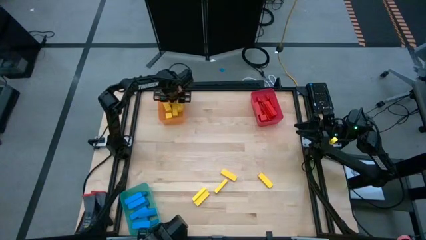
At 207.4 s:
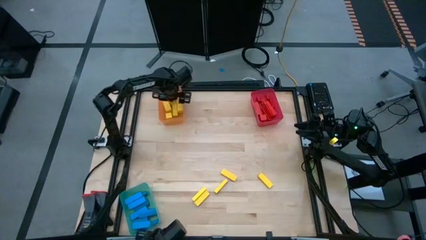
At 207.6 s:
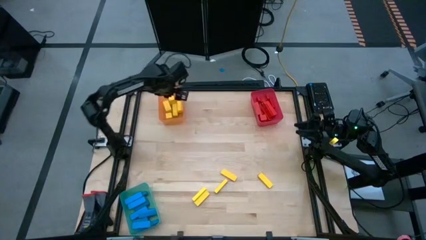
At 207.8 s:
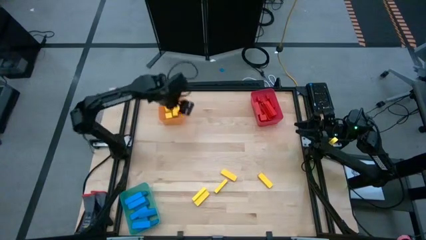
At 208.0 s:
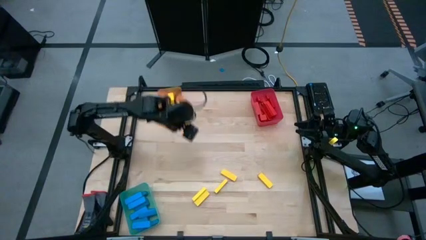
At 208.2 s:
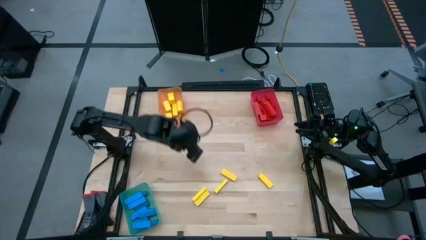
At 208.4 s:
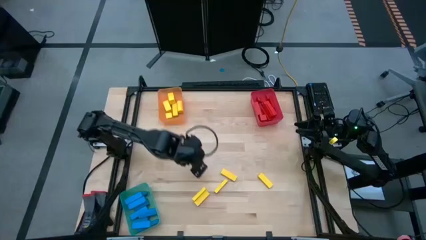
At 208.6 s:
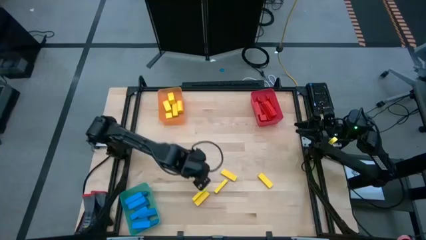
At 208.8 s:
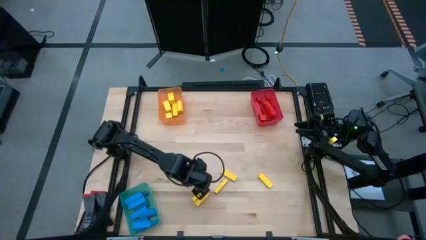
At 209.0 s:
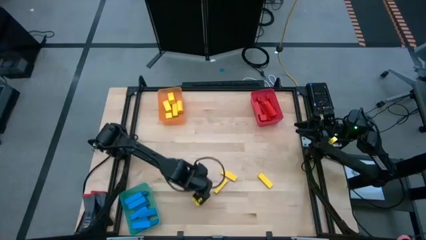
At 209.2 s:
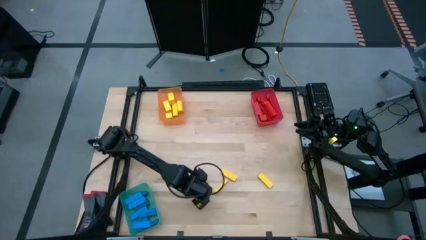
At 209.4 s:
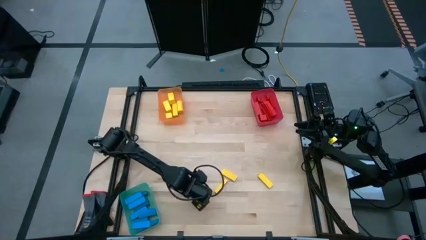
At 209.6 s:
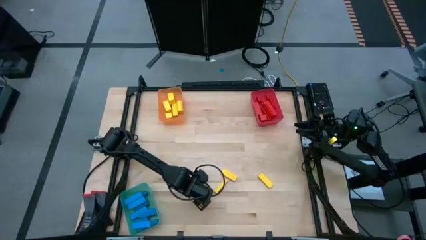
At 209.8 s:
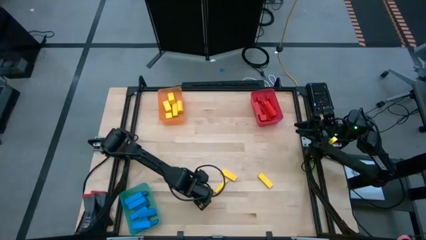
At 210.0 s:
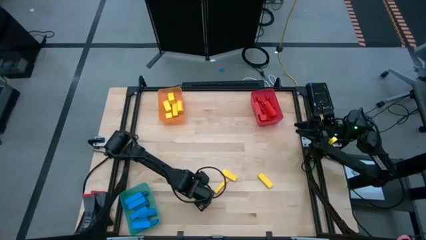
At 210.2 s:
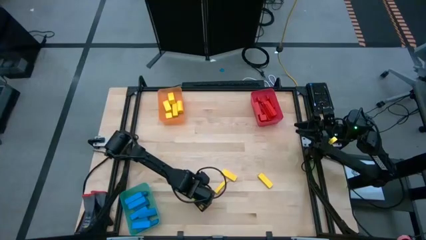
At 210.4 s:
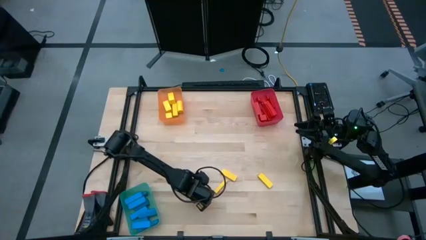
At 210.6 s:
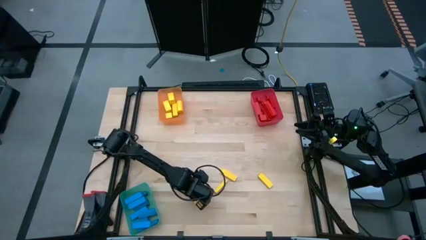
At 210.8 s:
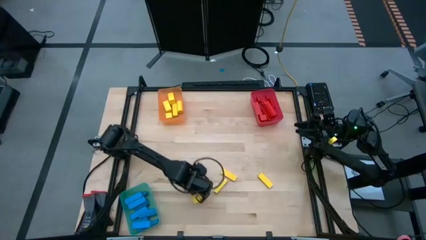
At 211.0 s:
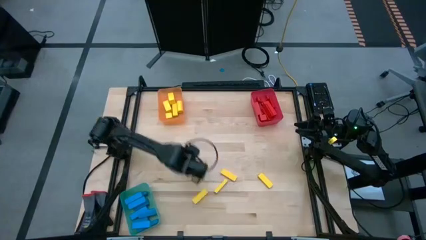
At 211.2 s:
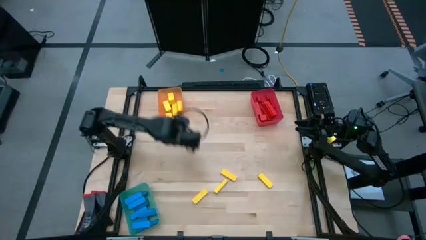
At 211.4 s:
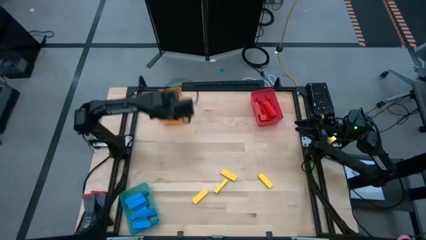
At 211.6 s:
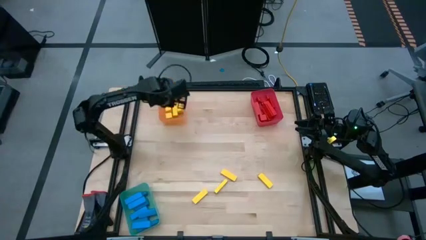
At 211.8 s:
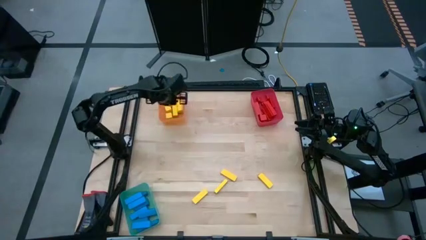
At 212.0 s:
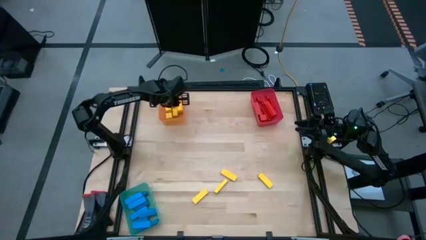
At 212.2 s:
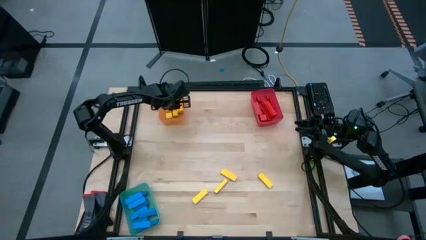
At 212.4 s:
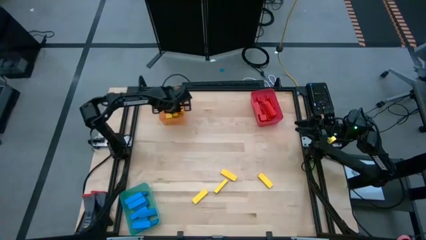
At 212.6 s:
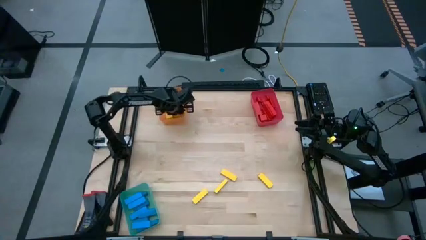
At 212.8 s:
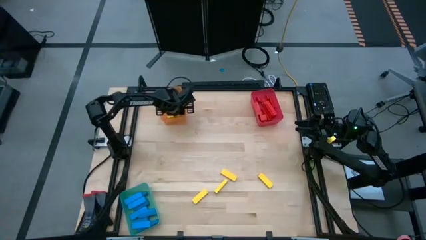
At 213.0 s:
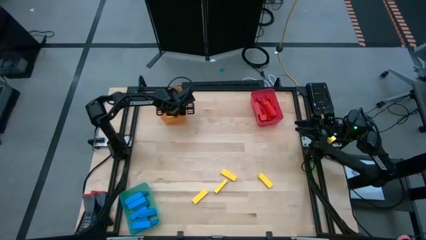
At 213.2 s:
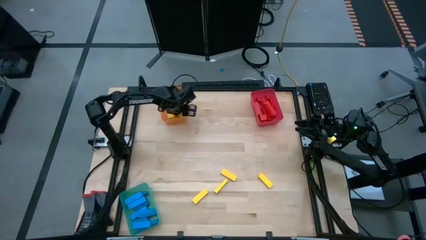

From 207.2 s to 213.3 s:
Task: Sort blocks
Put the yellow block into the orange transparent bin

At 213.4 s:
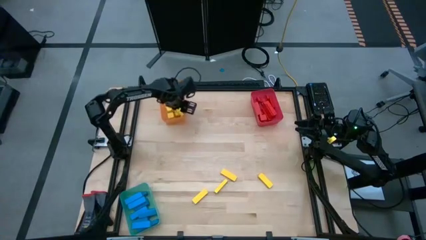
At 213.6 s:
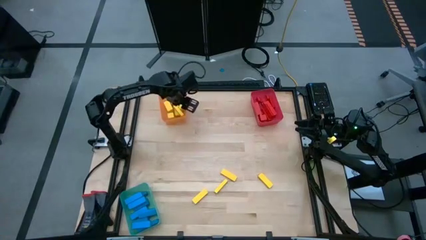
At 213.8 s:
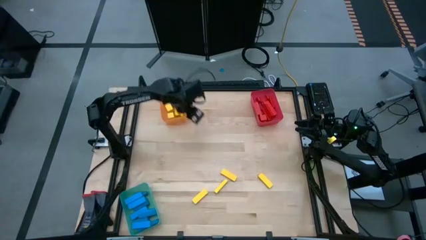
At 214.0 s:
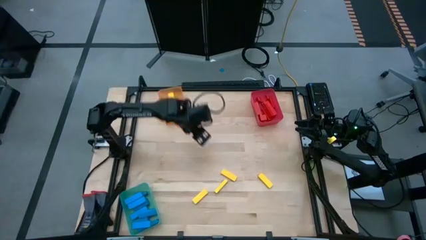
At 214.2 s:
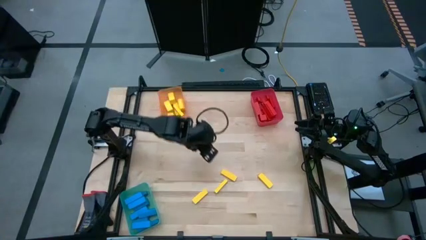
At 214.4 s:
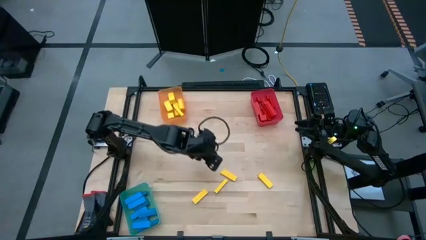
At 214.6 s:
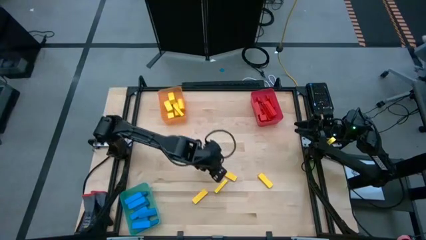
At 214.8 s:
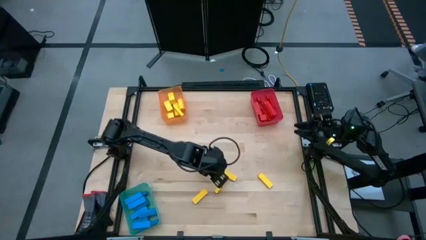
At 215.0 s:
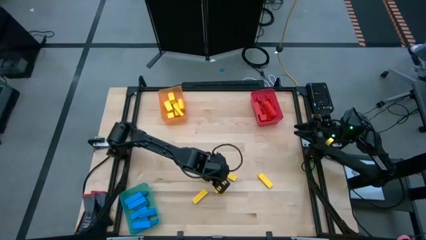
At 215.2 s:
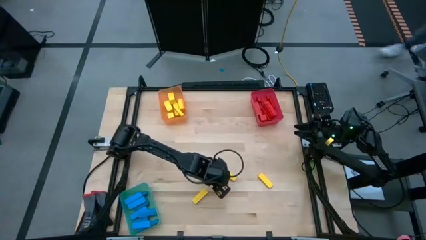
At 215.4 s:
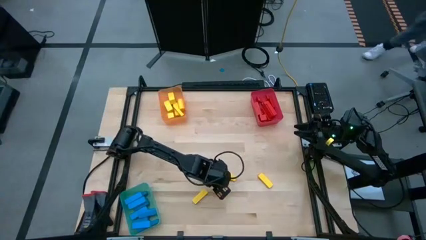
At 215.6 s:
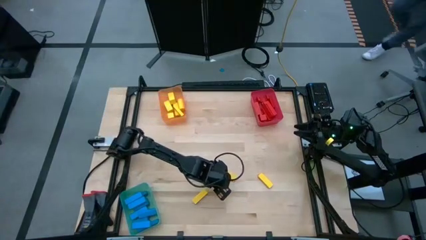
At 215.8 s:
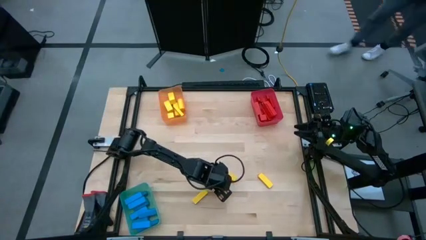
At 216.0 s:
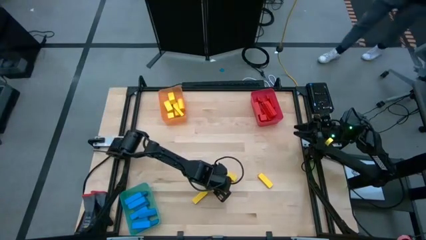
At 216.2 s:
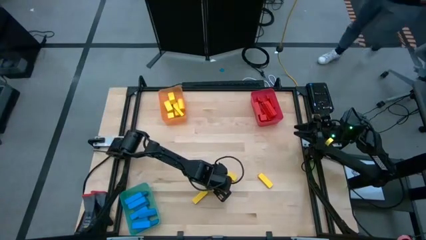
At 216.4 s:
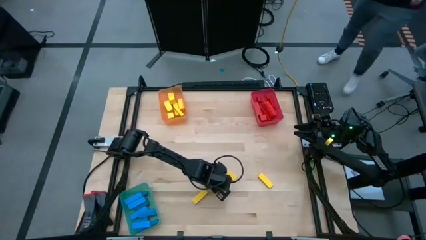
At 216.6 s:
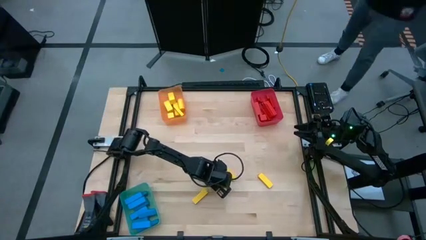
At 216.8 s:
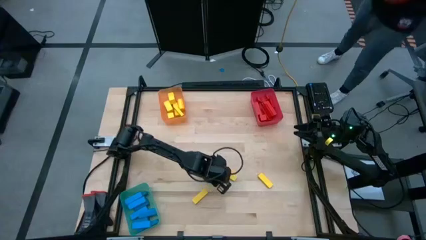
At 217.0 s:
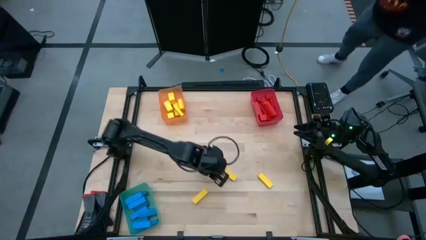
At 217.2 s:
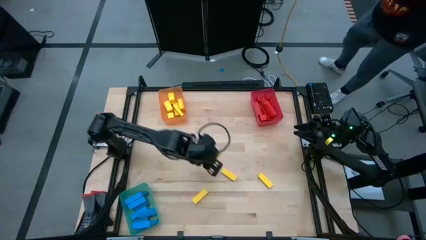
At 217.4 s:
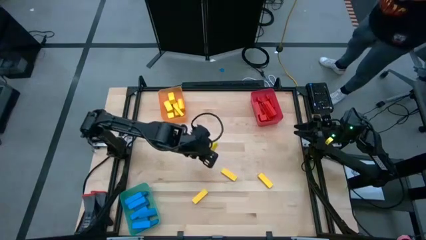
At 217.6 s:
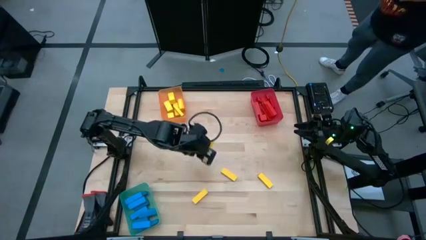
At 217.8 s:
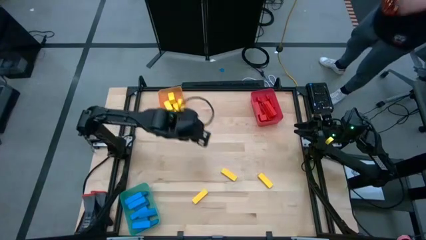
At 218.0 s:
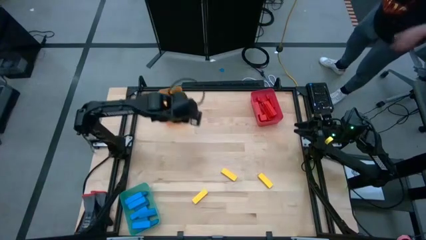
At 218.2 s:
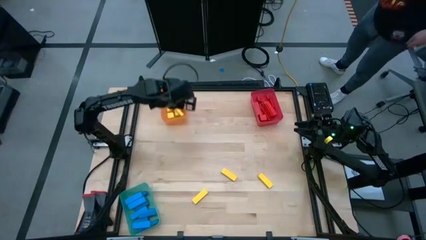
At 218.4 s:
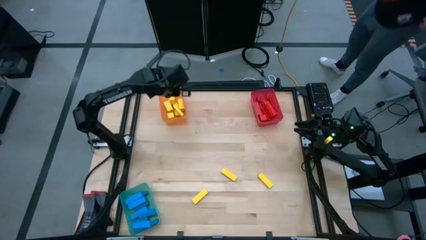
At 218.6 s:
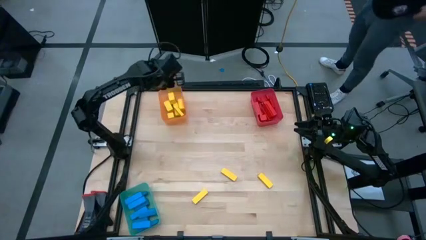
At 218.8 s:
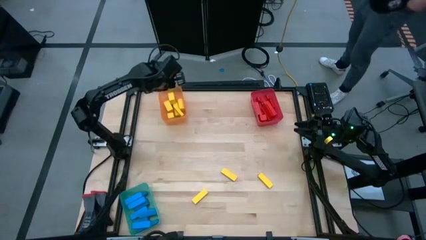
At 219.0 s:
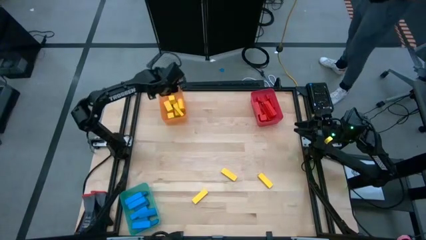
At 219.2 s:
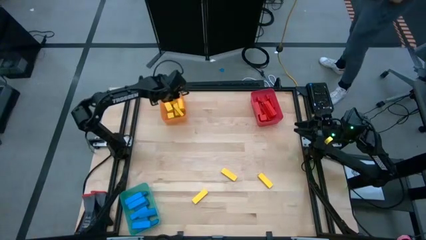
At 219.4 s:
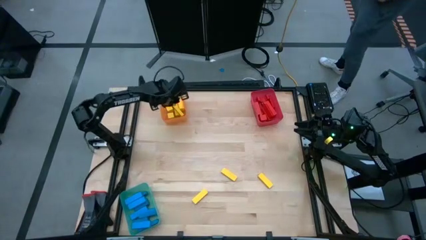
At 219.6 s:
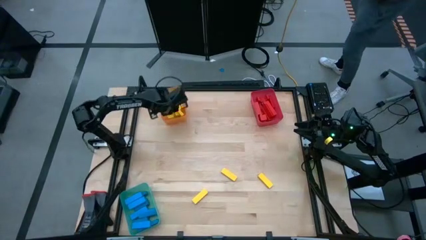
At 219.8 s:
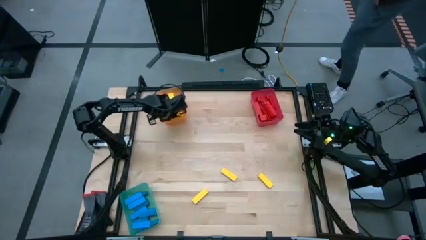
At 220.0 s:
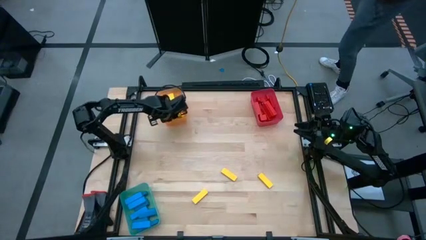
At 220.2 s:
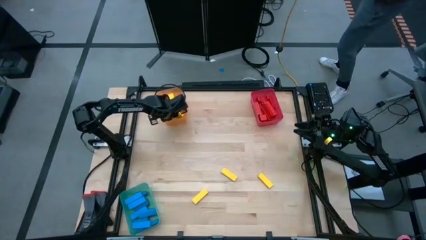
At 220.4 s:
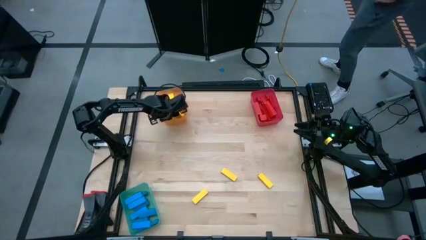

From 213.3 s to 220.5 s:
Put the yellow block into the orange transparent bin
